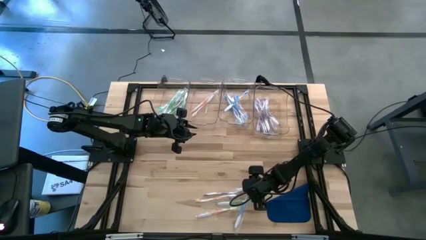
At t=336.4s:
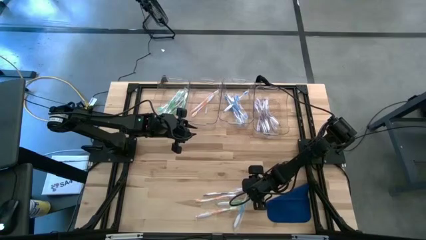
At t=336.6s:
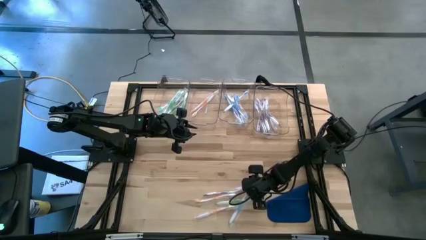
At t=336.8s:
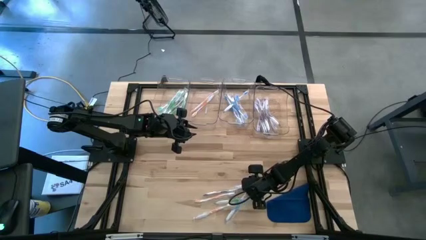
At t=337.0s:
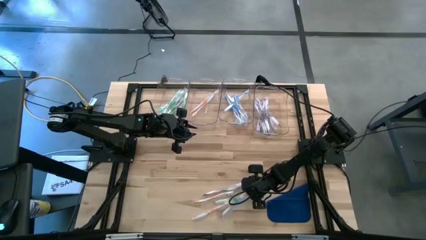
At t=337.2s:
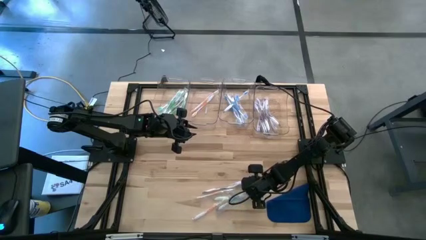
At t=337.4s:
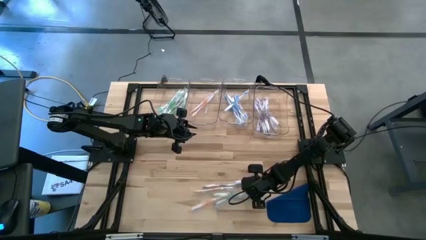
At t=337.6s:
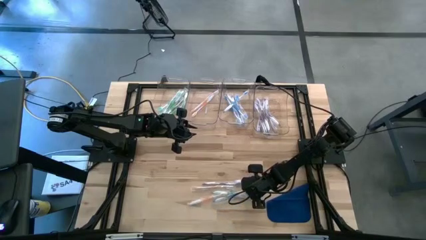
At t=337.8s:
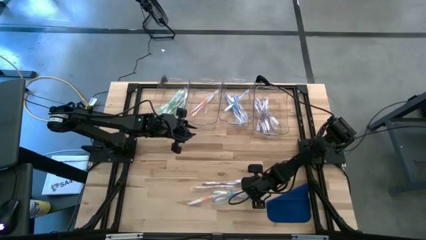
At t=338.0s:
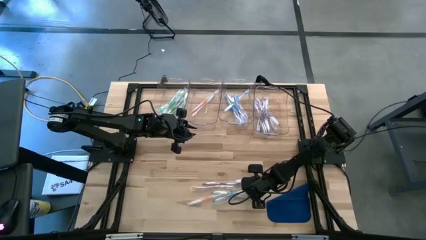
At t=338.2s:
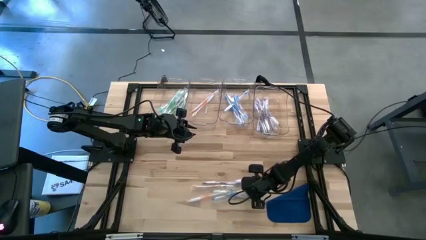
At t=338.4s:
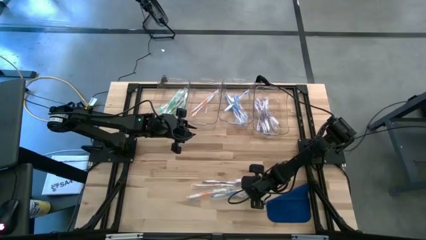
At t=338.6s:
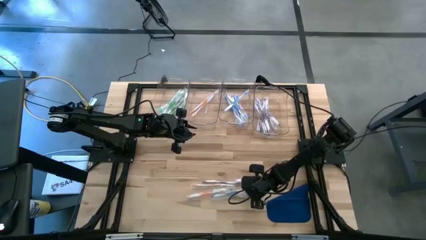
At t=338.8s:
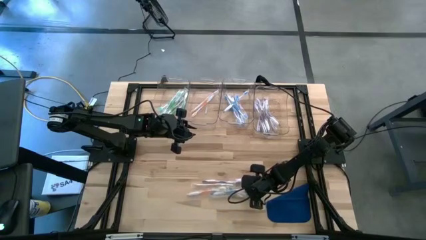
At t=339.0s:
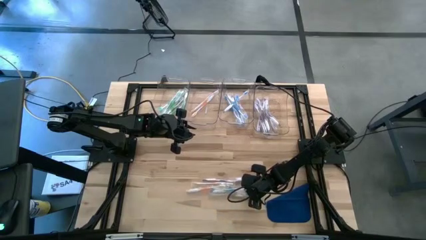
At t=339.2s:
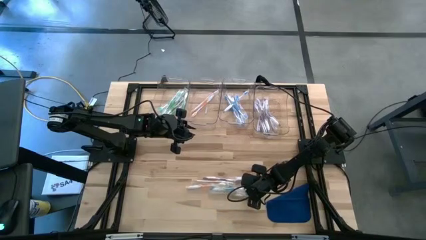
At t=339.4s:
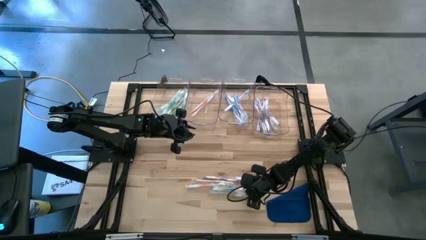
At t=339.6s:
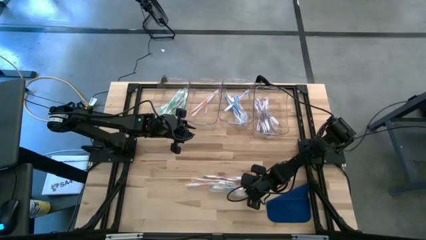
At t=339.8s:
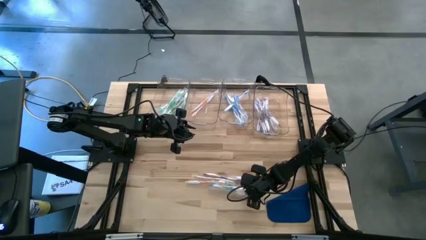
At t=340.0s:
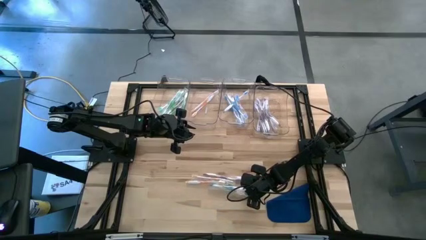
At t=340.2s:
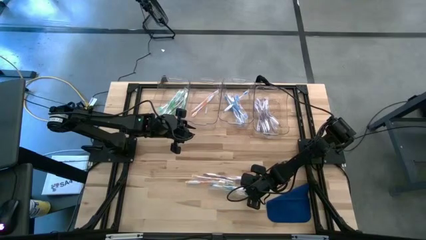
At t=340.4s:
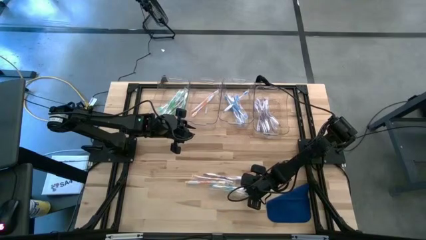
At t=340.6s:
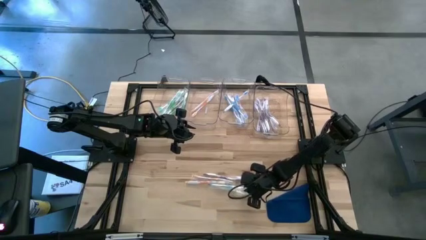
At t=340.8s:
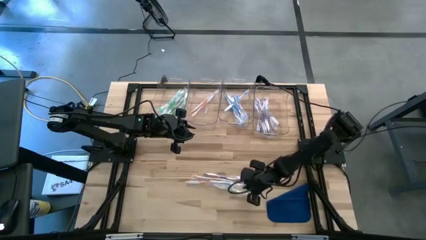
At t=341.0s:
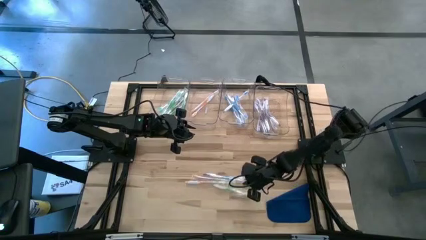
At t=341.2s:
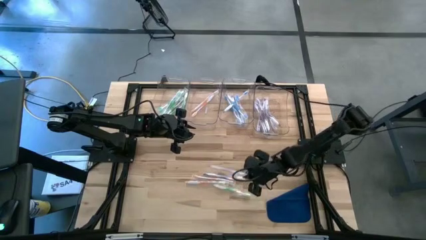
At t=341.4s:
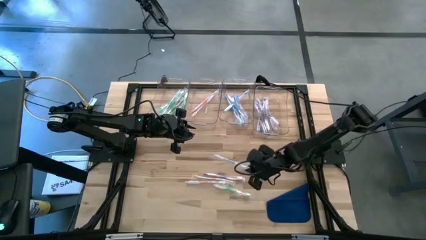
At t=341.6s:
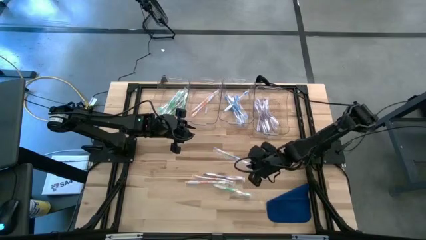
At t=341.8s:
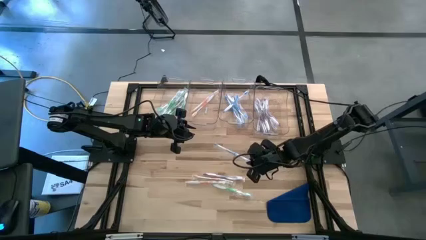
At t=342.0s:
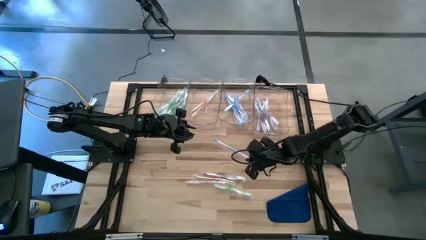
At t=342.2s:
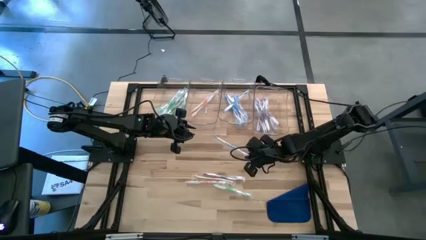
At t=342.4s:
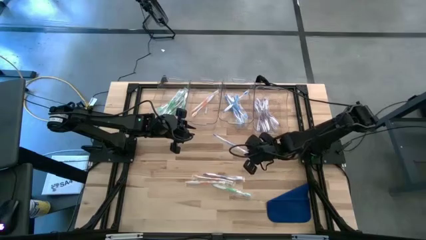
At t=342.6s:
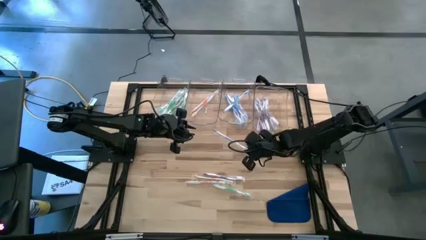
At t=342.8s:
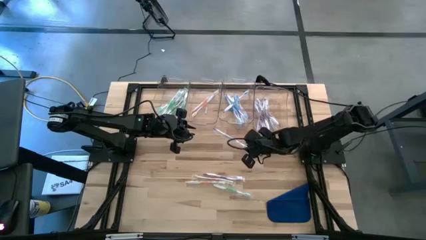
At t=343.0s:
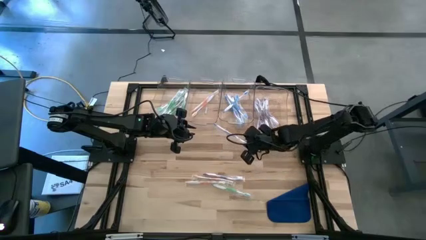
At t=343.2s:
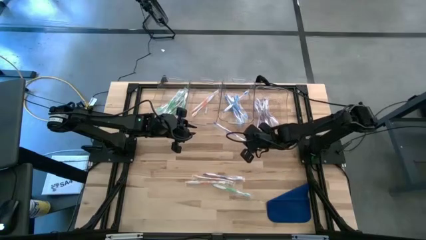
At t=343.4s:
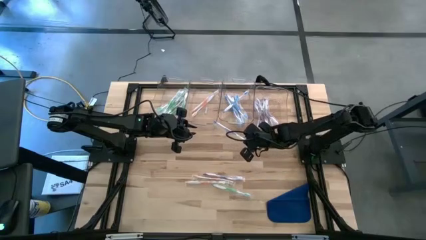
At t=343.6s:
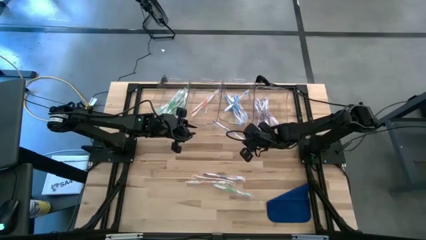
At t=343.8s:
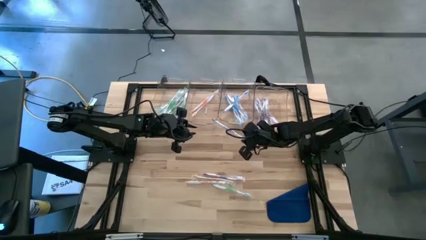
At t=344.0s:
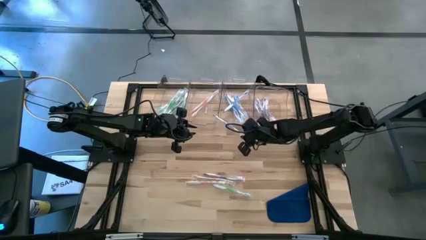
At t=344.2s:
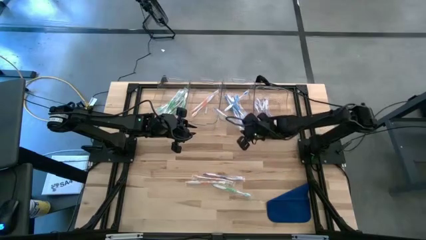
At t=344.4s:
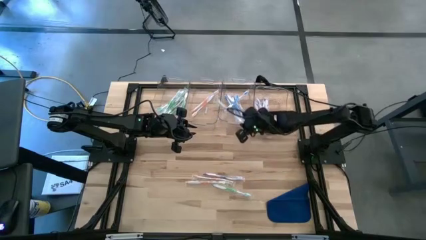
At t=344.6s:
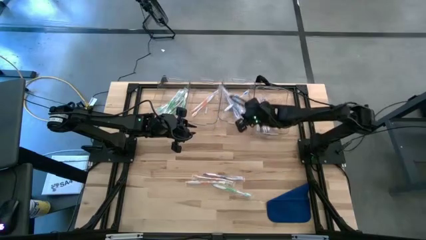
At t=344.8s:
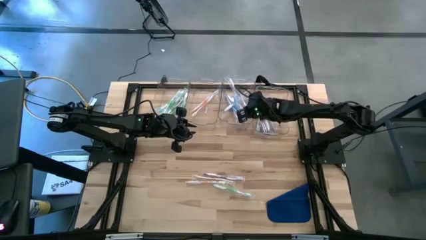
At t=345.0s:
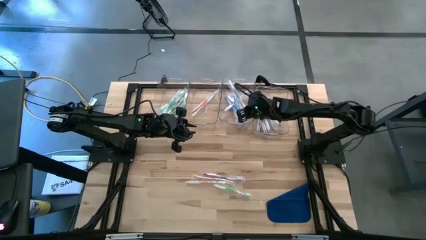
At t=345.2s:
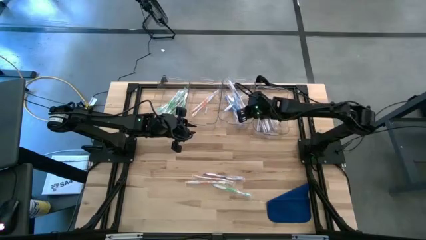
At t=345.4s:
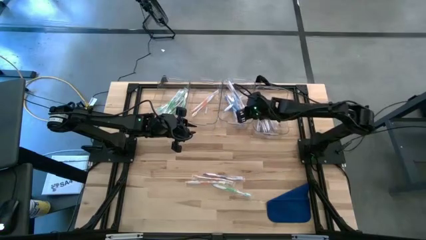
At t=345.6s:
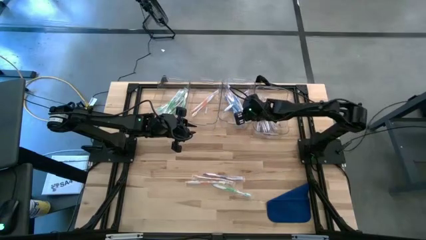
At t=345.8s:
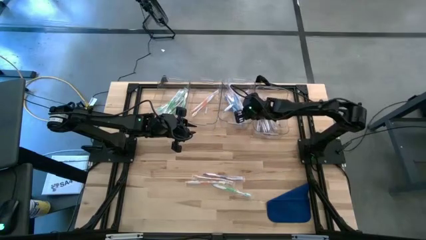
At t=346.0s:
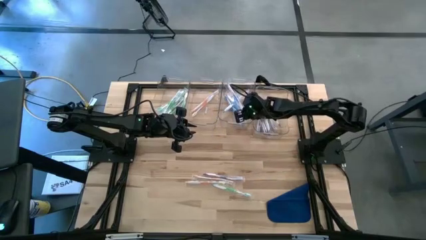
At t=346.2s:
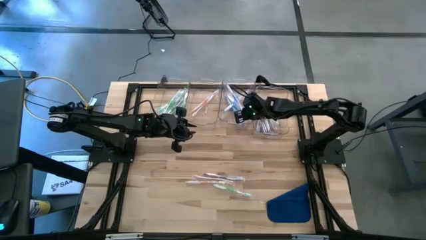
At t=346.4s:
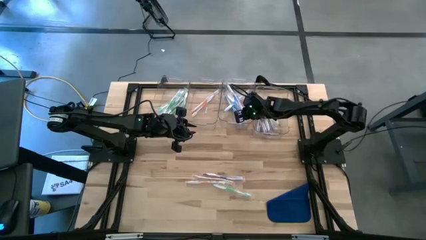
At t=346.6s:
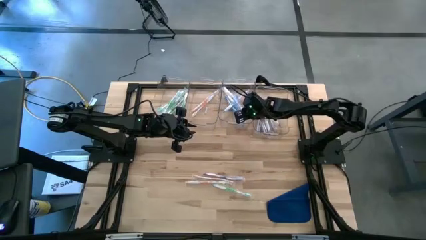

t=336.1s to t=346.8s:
Task: Pick & Place Toothbrushes
Put the blue toothbrush into the middle right transparent bin

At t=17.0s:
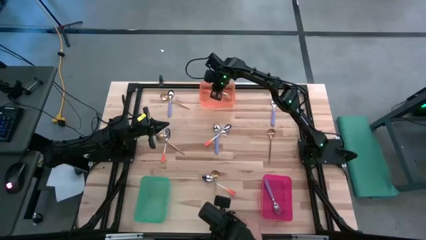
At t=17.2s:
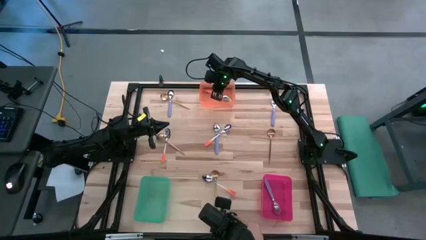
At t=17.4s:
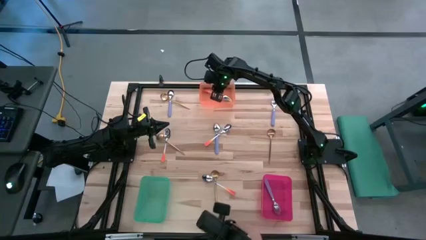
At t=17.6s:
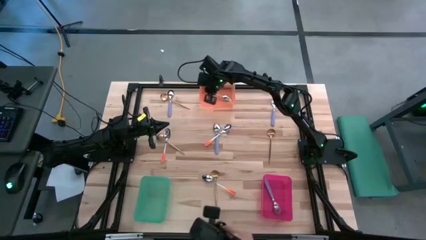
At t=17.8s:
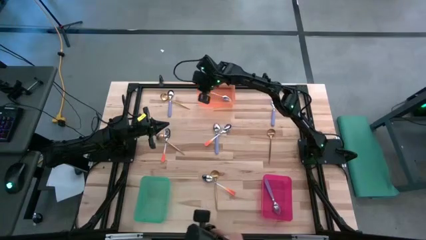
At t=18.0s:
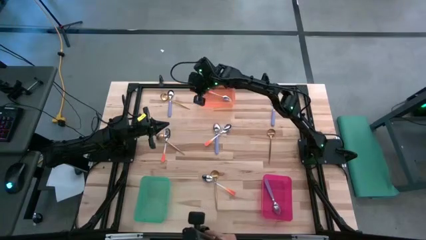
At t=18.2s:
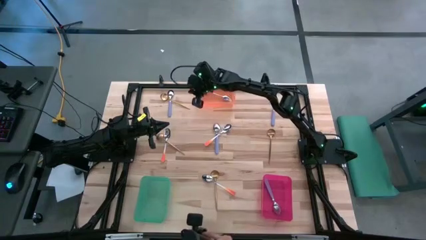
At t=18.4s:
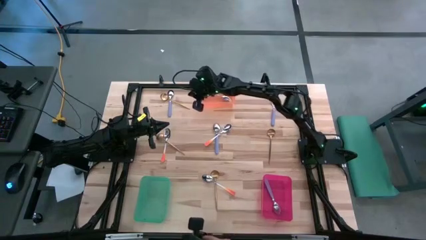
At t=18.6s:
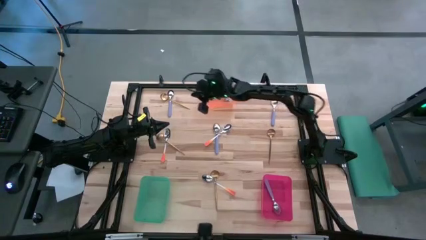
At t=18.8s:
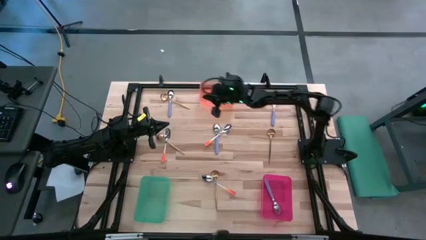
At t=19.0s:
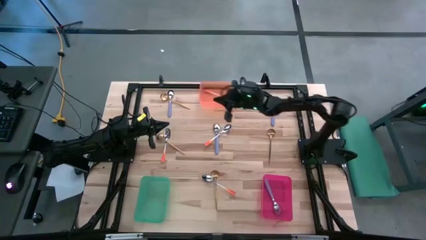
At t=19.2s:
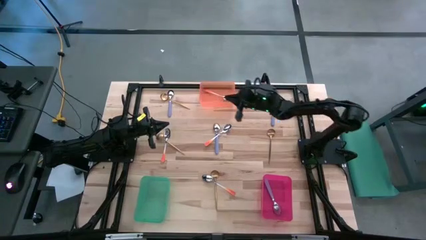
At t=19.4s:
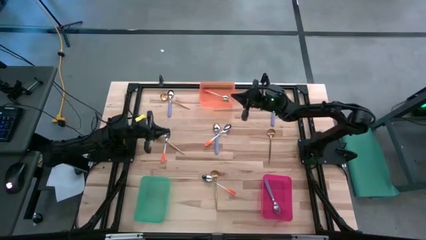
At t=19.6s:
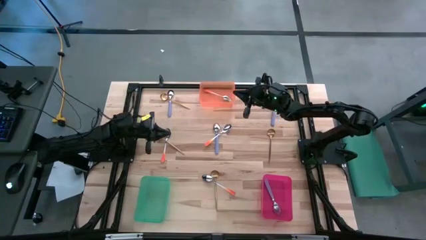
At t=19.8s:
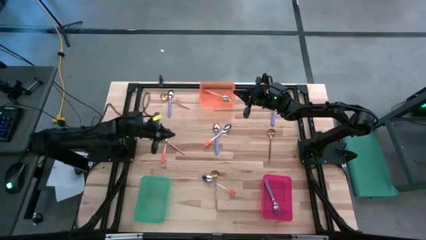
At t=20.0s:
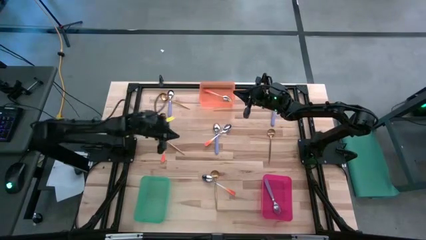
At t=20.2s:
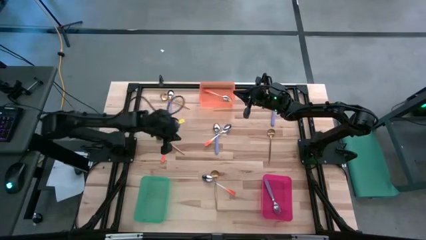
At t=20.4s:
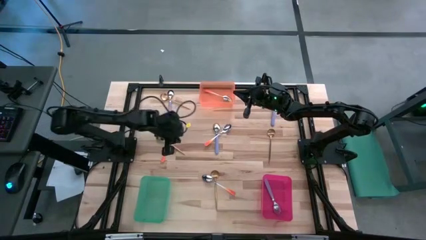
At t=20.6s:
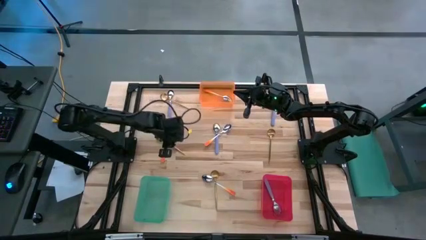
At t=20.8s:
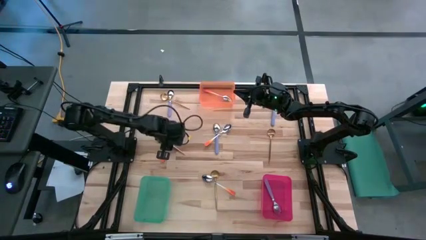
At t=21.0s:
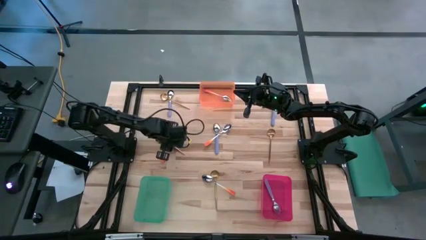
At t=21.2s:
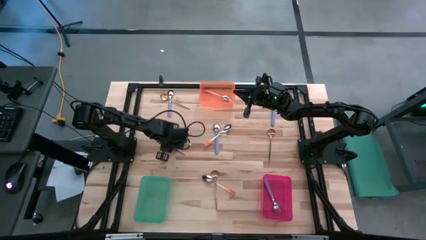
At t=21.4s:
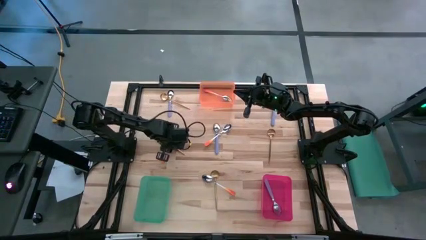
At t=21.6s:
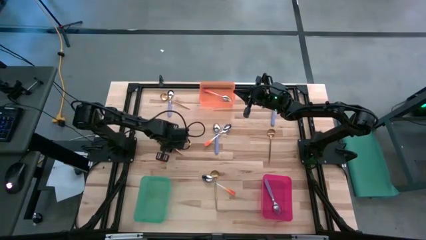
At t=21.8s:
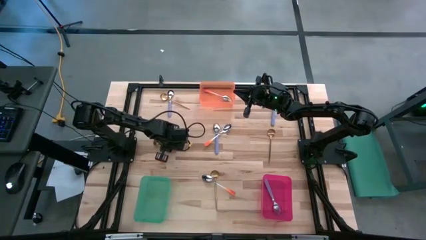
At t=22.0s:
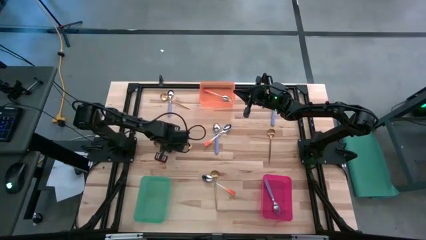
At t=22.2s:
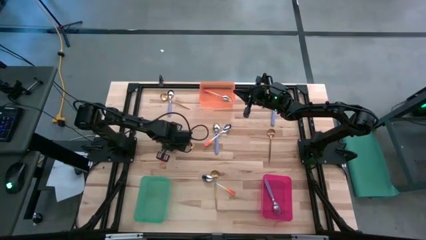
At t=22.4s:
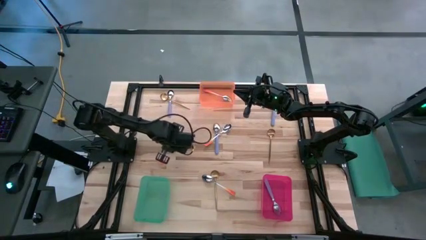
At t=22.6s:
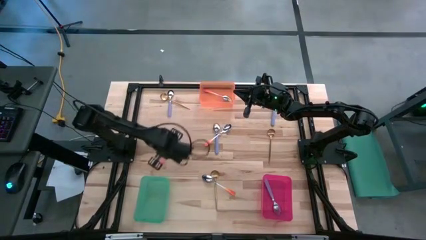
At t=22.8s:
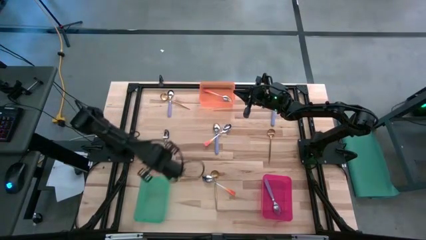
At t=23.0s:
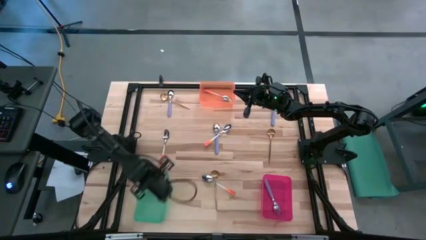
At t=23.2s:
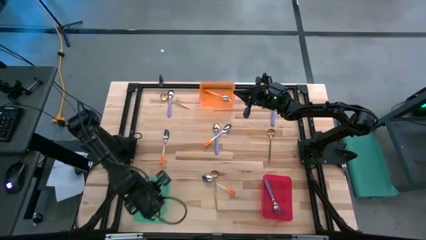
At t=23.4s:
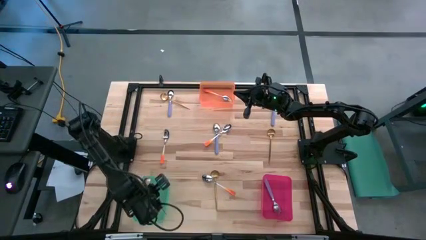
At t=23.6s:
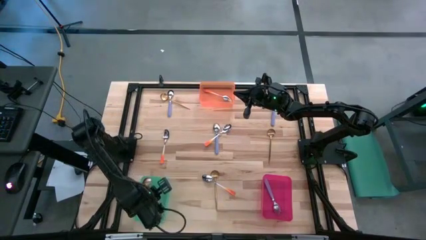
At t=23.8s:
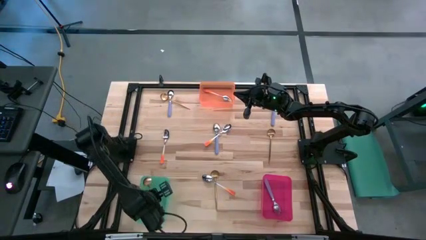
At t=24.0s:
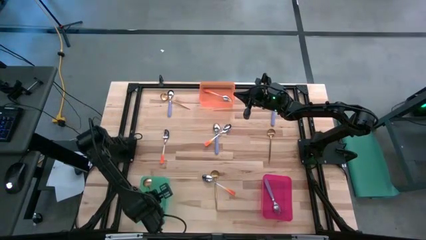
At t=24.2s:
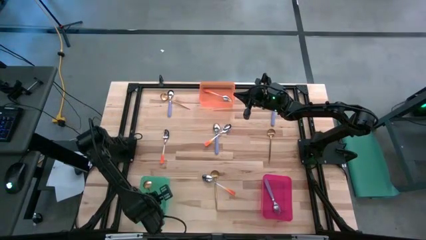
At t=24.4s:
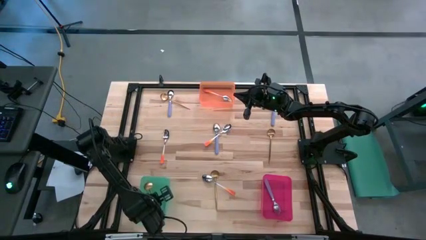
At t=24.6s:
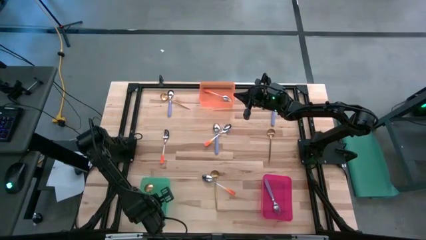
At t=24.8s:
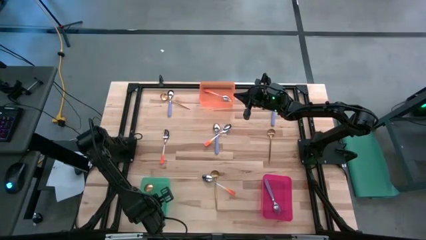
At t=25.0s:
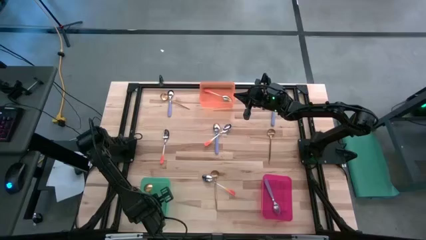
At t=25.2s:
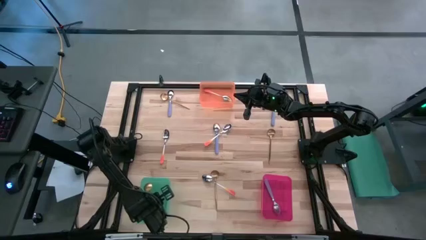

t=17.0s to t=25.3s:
Task: Sort silverware by color (type)
Put the gold spoon into the green bin
